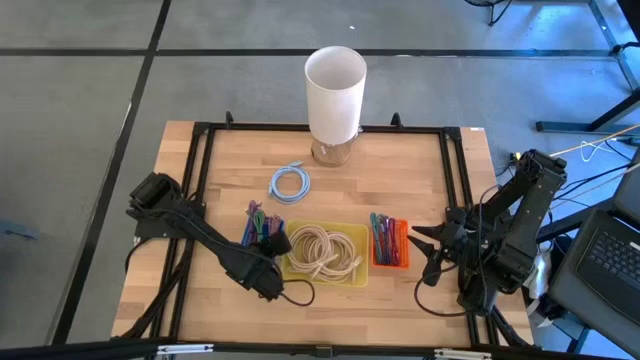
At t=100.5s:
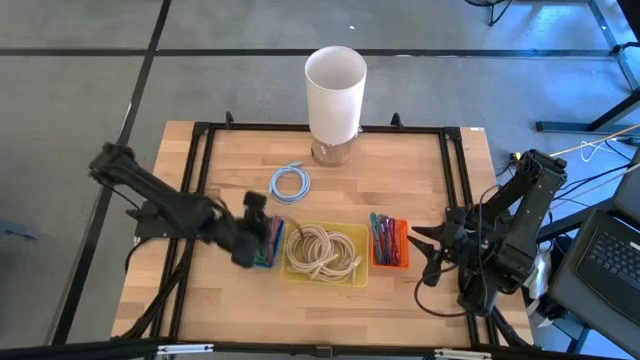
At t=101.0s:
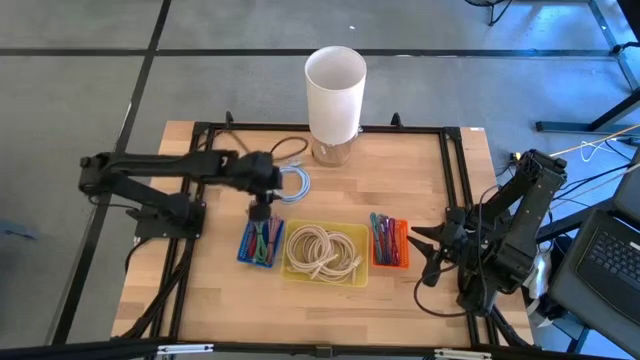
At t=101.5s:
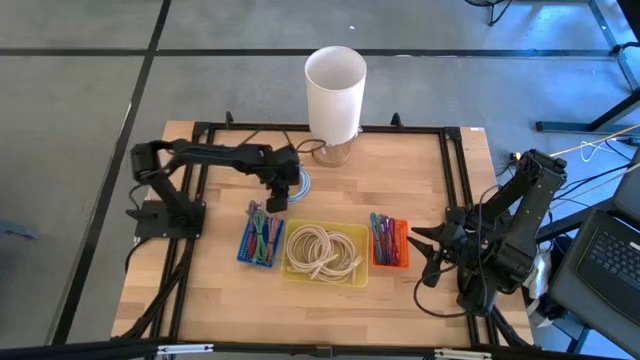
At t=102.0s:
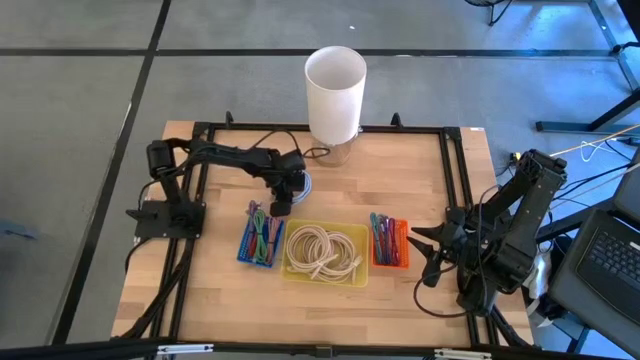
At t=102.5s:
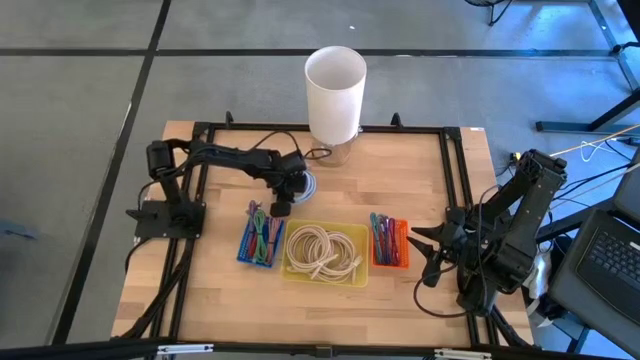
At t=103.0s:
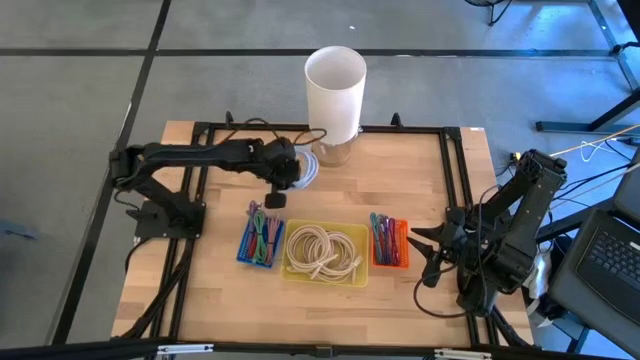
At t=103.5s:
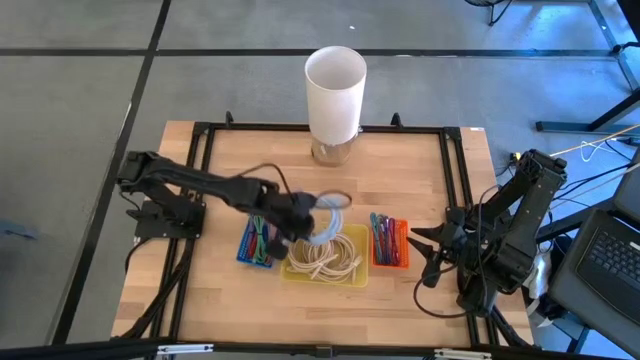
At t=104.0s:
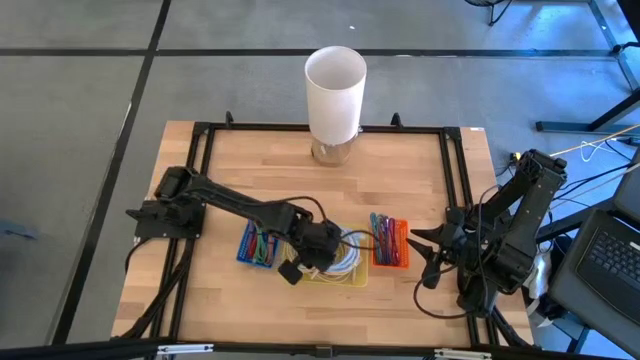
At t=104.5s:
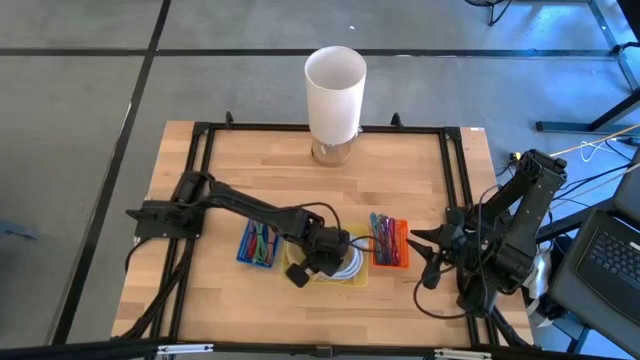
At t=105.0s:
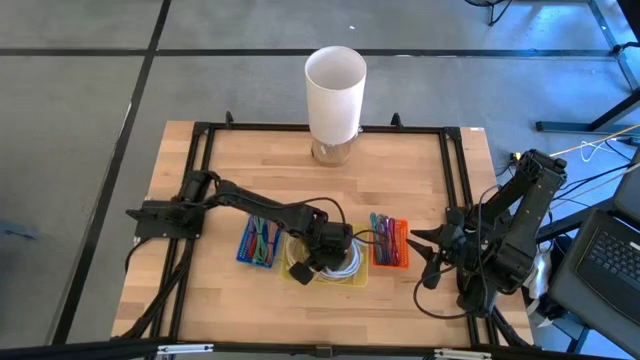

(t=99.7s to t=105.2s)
Task: Pick & Place USB Port
Put the sky blue charger cable into the yellow bin

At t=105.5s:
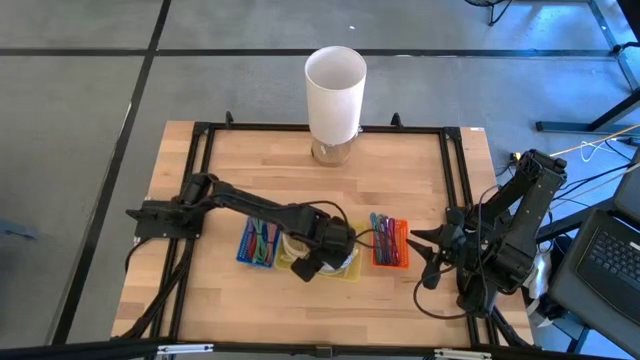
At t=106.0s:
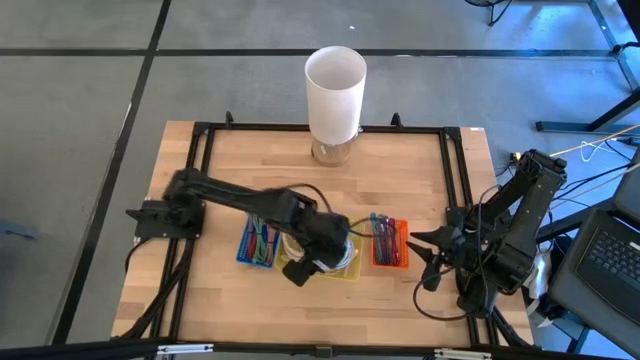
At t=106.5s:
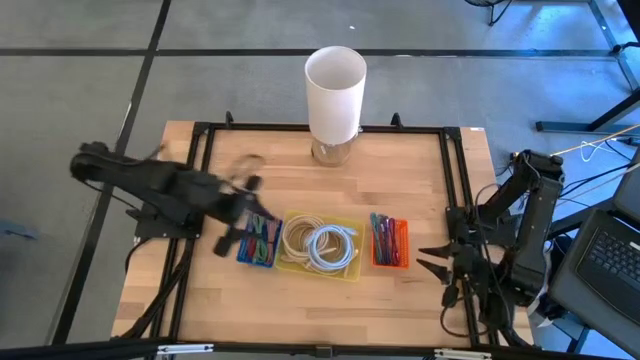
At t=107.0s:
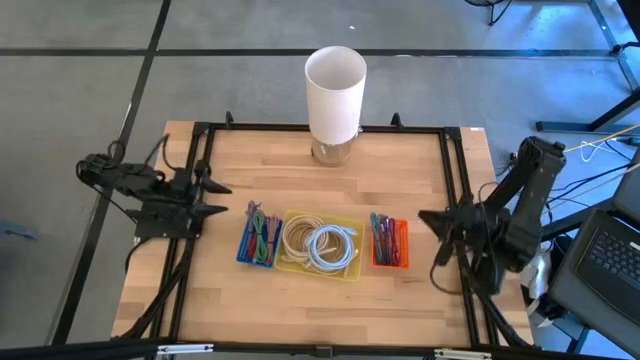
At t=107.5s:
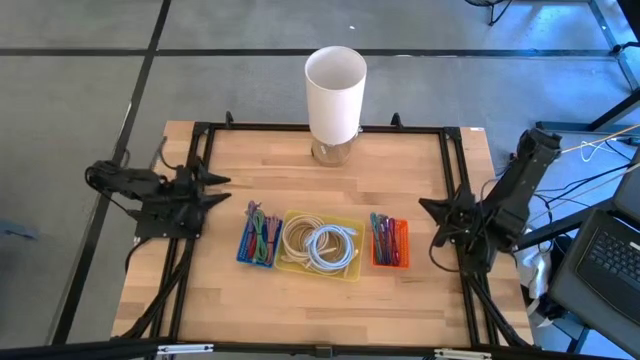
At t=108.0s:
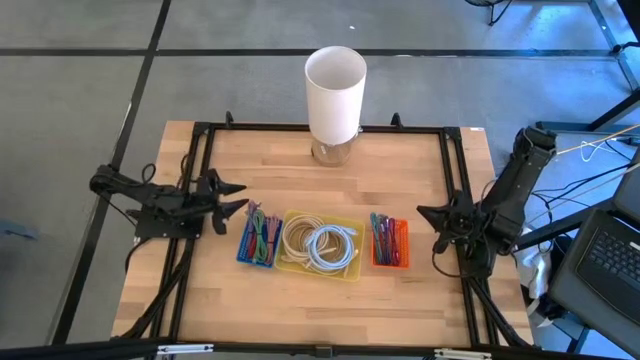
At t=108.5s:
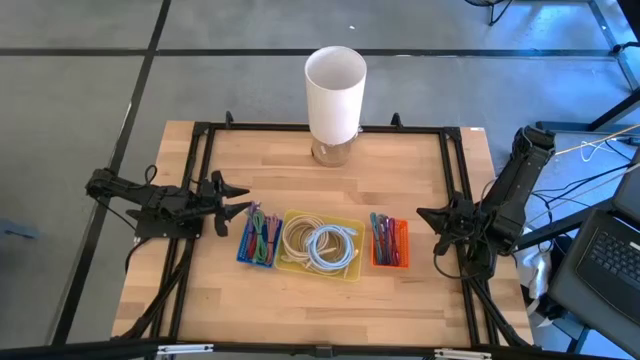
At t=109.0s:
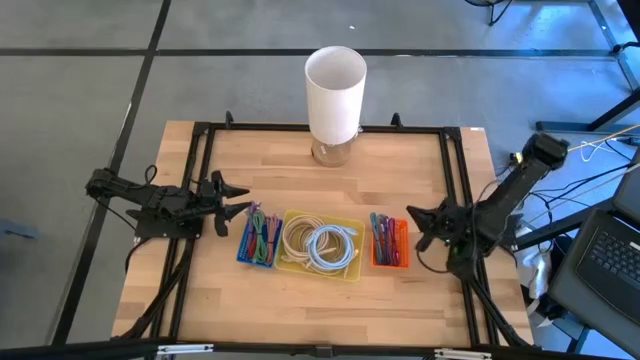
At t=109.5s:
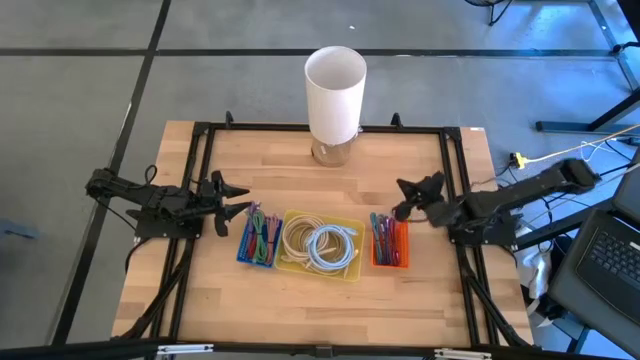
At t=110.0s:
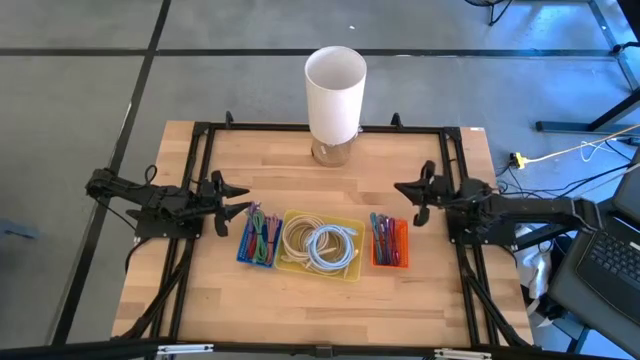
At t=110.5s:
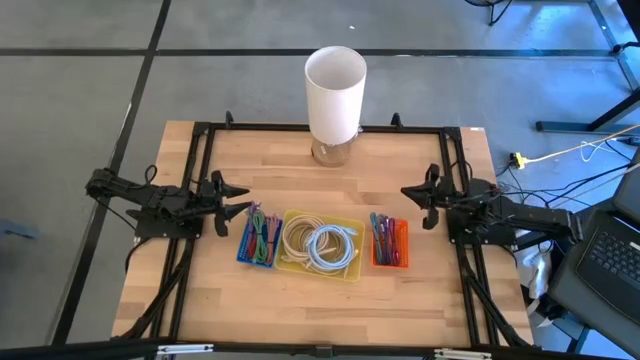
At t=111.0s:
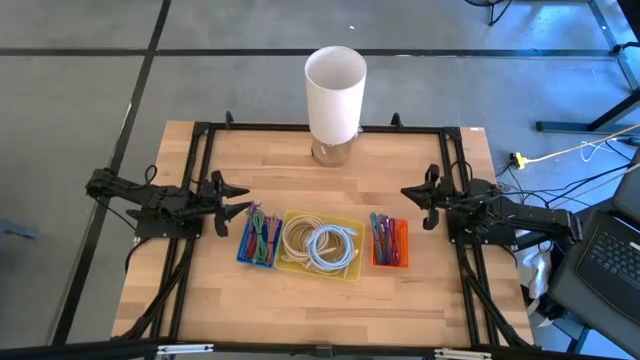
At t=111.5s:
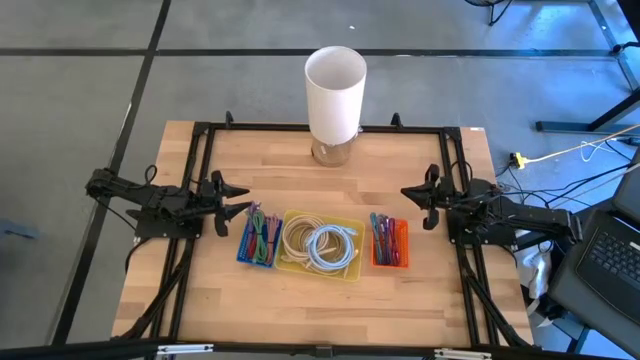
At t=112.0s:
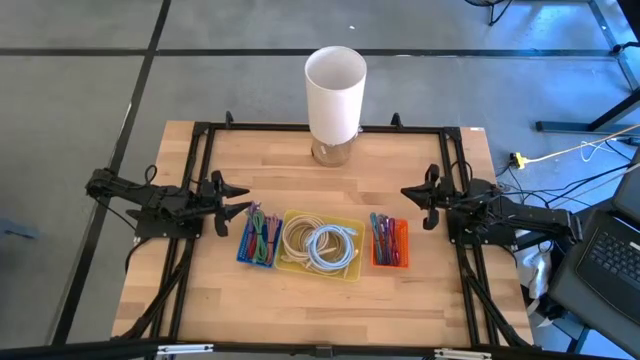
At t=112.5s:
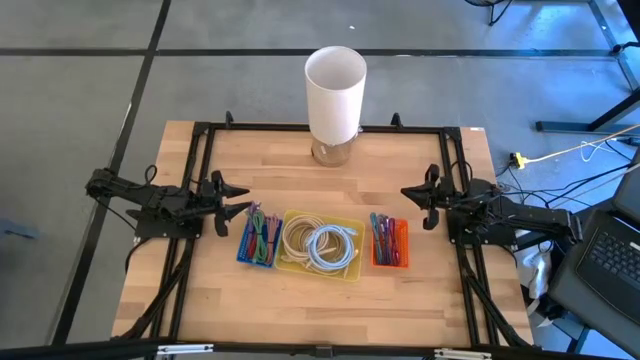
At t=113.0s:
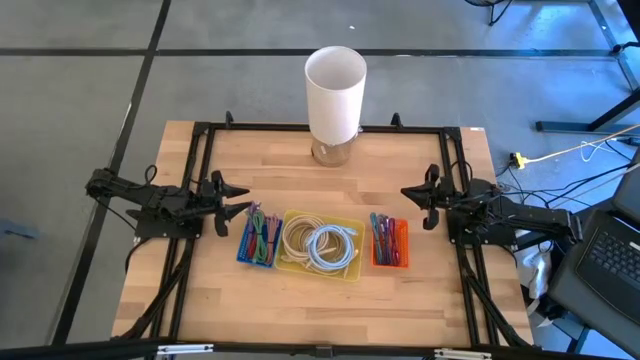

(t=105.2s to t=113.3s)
Return to home position
